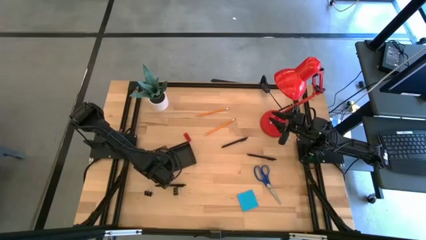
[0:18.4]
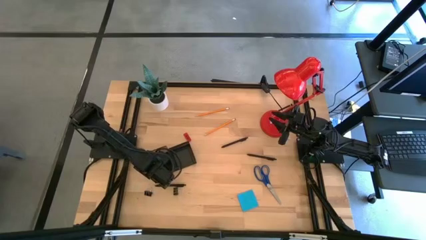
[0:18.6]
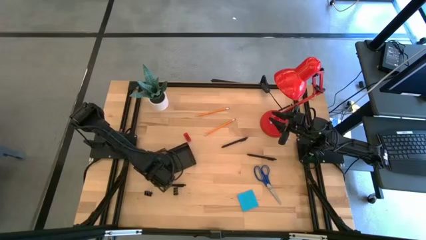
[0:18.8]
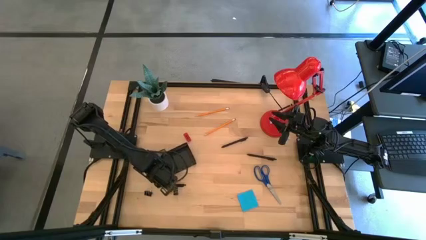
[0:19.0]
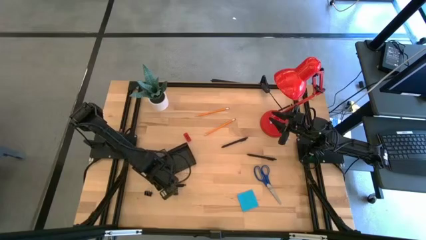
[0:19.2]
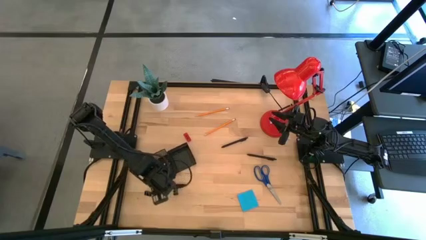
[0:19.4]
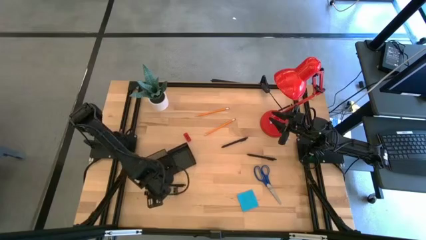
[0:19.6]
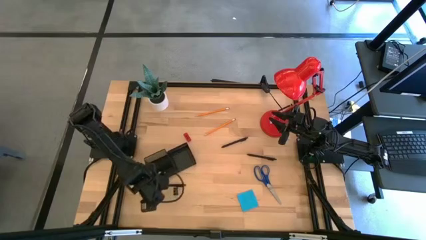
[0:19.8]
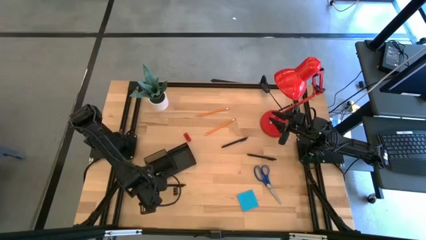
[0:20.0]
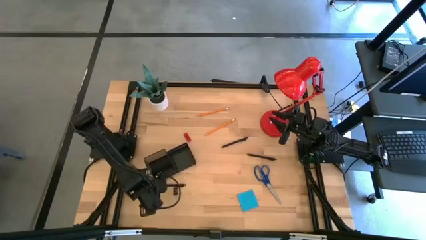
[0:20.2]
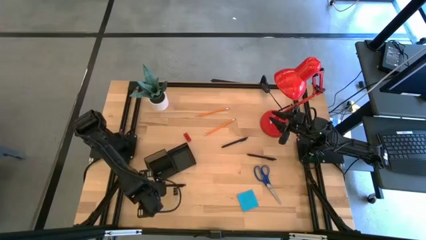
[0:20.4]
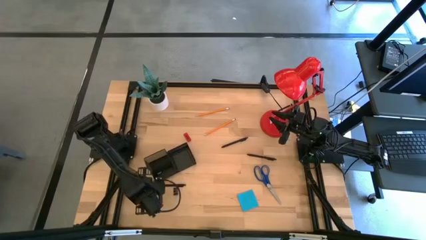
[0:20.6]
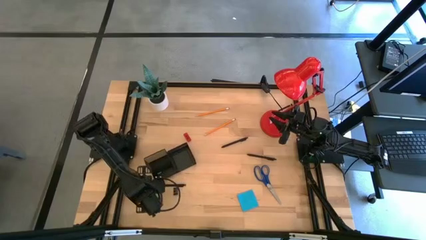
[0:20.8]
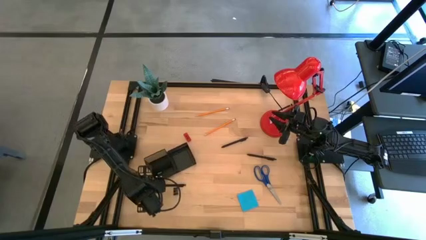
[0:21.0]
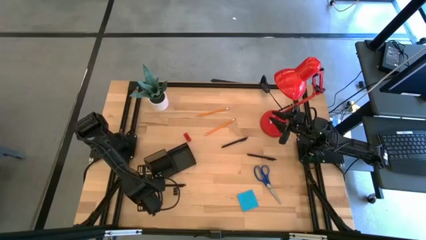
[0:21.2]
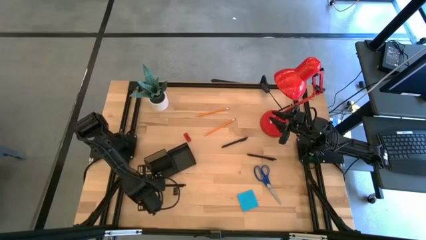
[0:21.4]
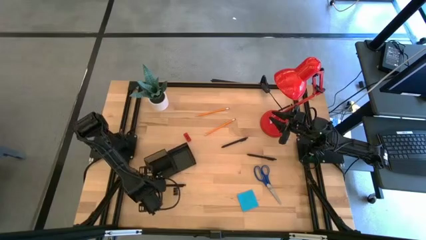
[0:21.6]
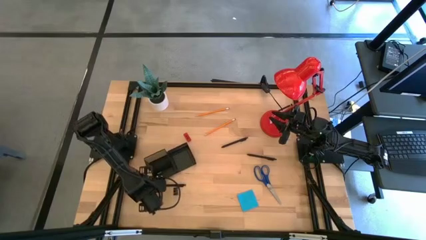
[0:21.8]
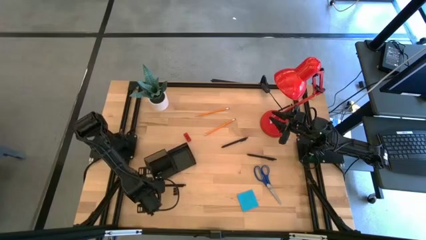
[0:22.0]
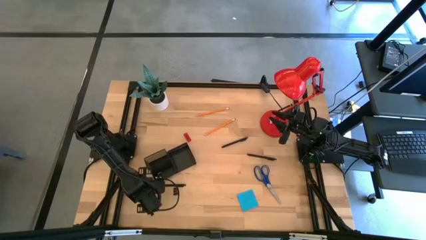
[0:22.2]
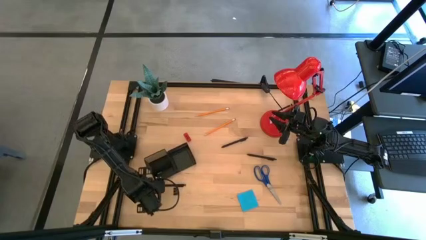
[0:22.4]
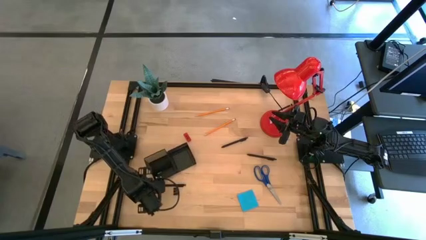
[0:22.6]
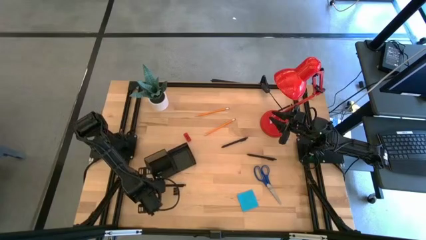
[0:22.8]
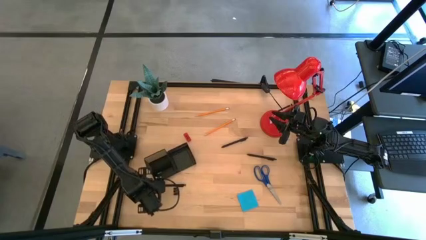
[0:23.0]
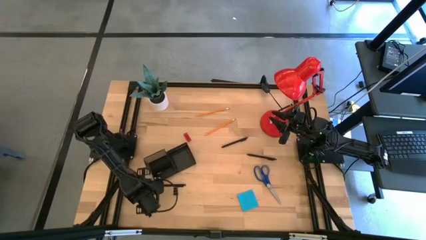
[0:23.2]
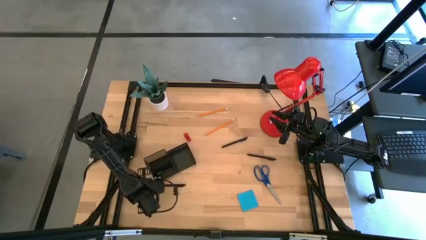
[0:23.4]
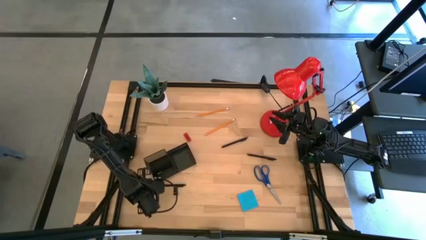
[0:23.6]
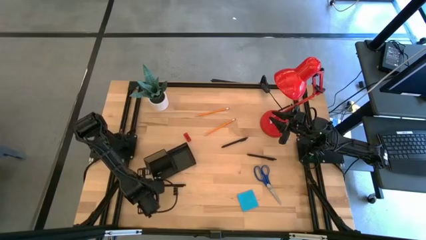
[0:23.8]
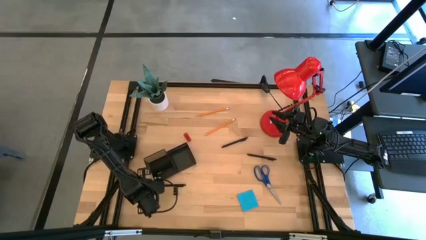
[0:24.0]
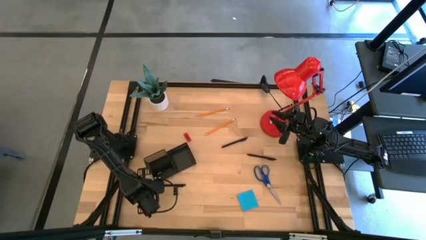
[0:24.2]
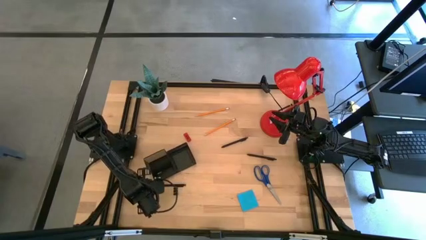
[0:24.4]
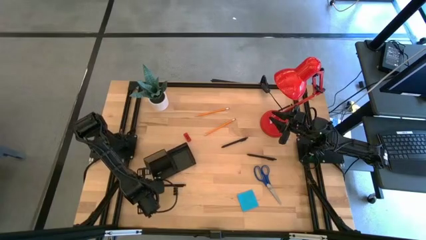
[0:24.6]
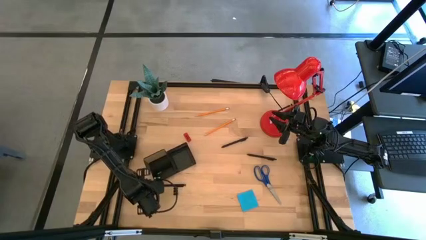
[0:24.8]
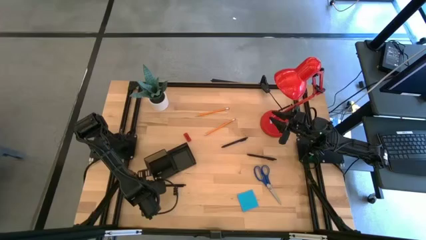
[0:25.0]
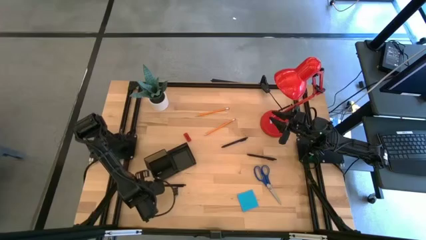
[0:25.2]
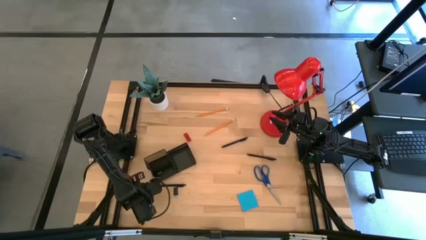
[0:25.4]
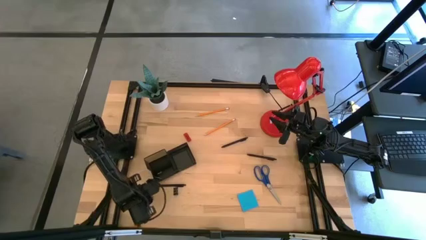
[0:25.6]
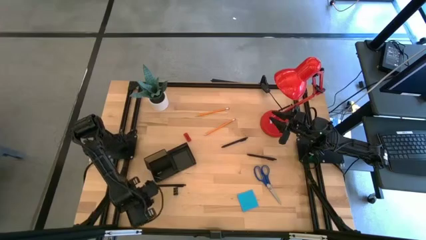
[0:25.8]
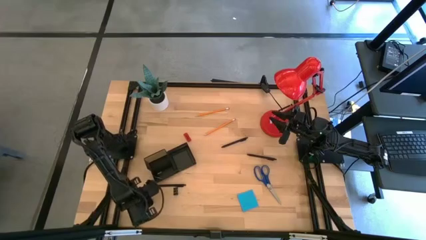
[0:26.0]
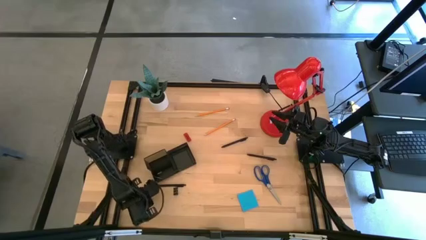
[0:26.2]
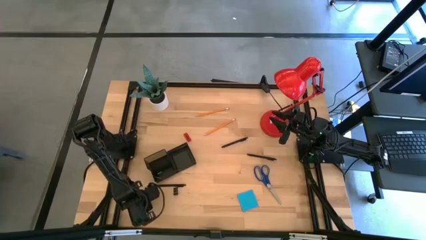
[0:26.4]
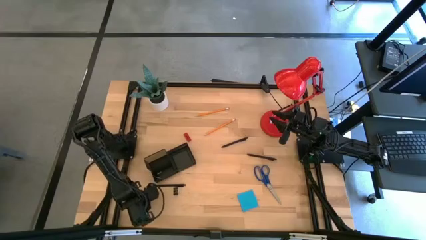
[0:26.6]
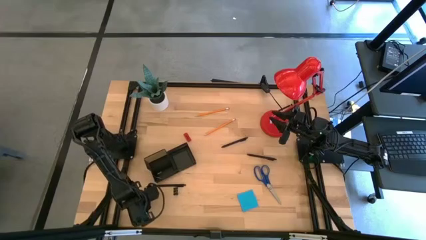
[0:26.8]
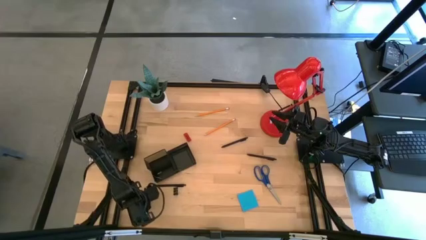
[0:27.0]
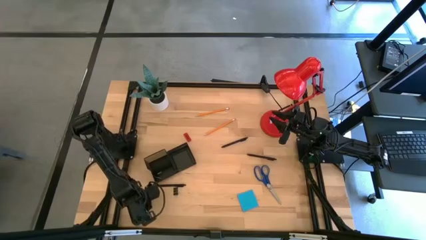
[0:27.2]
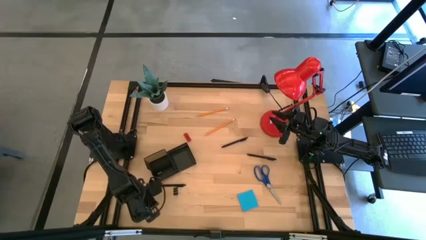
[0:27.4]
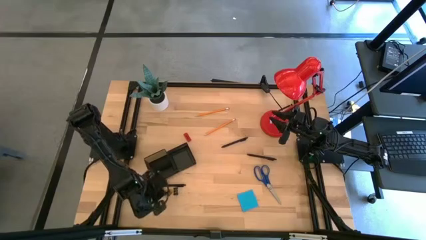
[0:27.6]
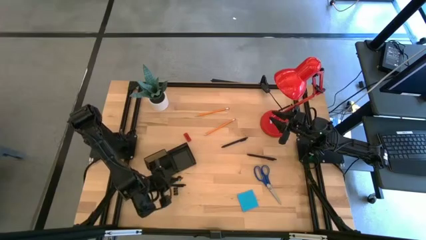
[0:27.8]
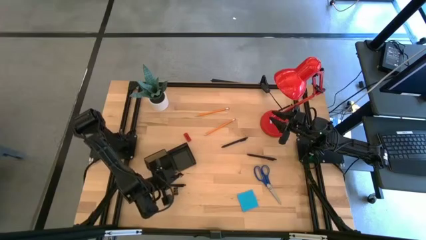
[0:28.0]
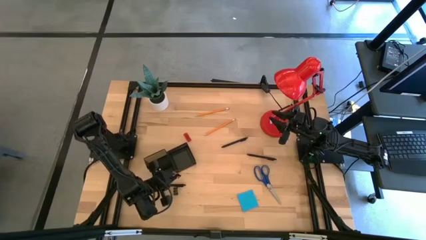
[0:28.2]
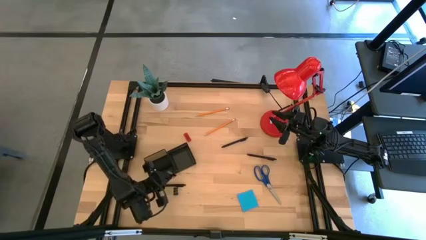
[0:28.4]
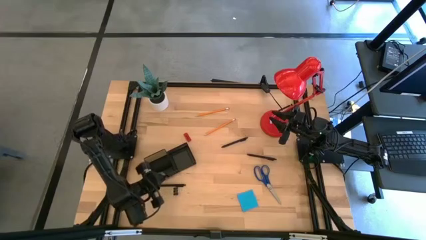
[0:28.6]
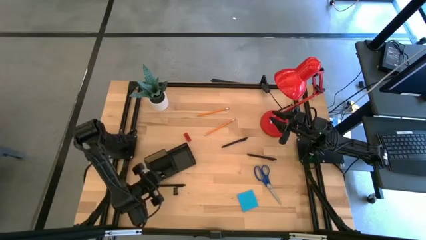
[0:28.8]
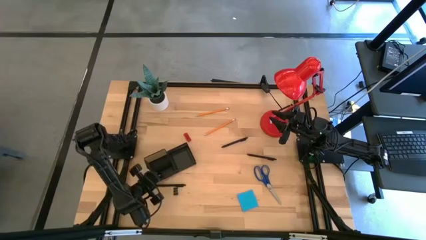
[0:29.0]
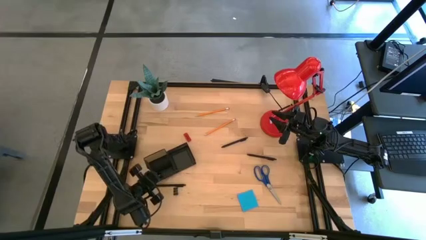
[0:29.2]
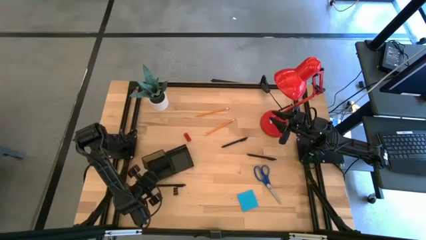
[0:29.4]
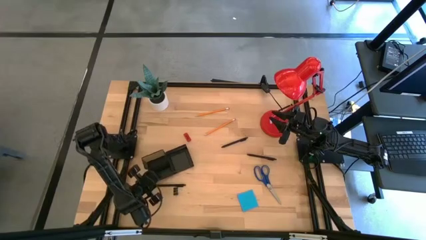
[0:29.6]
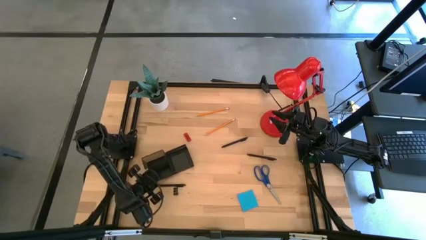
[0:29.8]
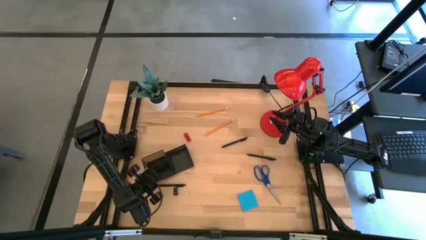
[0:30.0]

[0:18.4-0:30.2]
Task: Pick and place office supplies into organizer
Put the left binder clip into the front left compartment of the desk organizer
